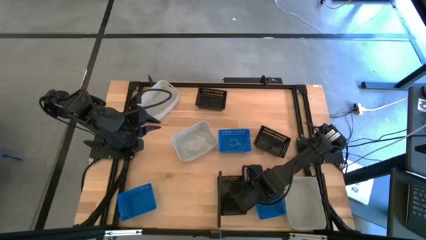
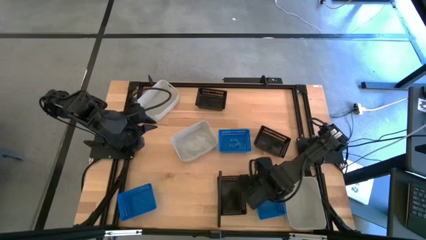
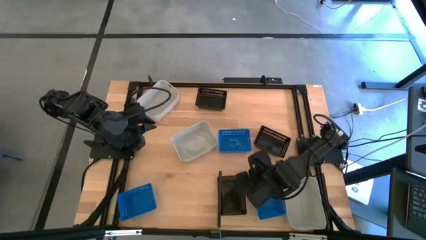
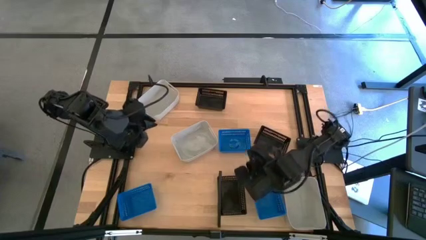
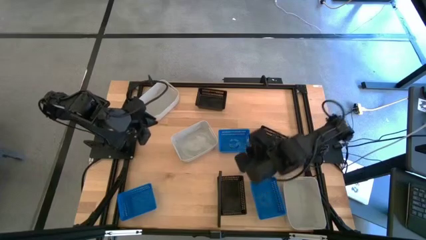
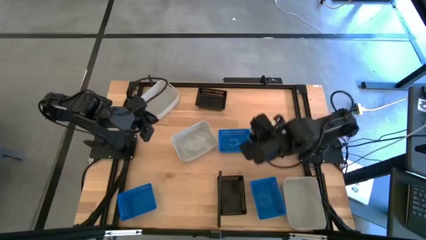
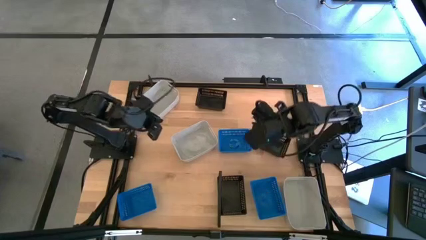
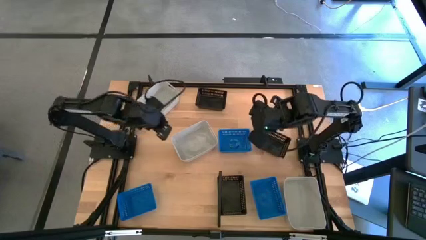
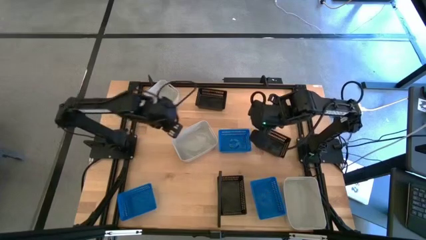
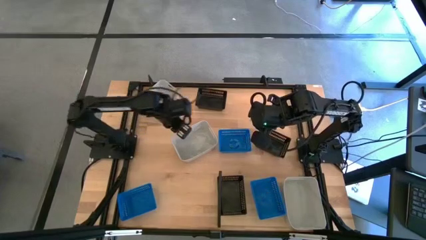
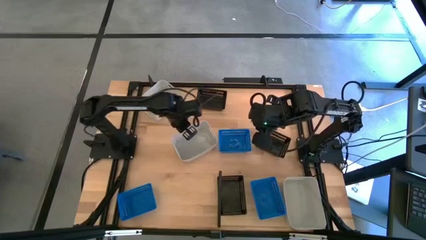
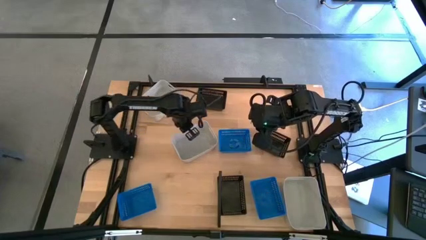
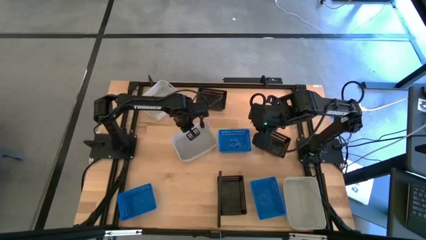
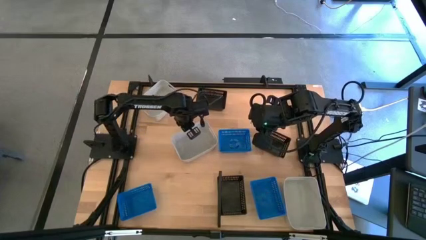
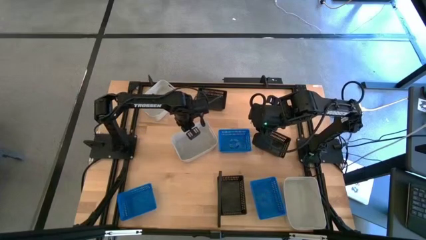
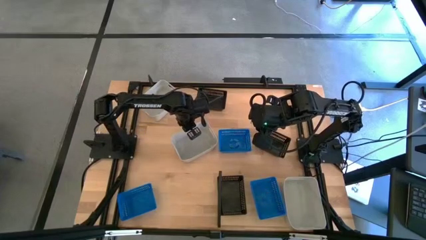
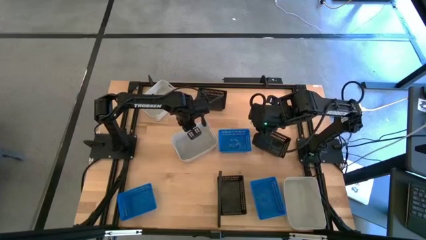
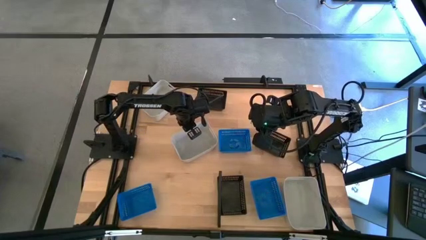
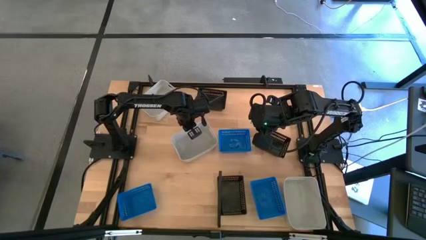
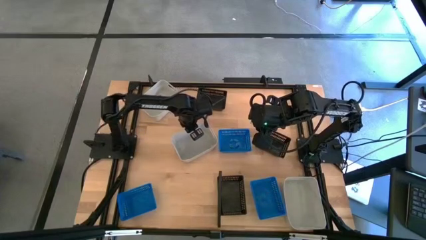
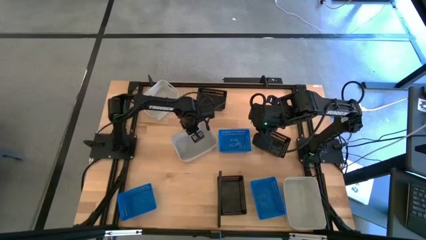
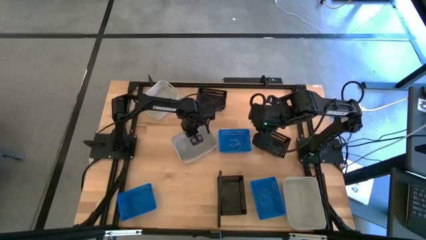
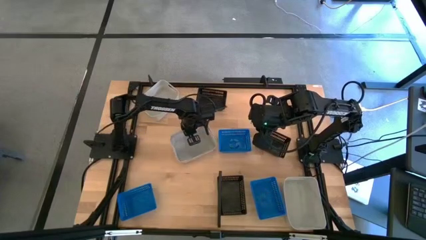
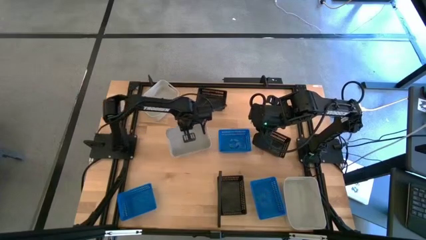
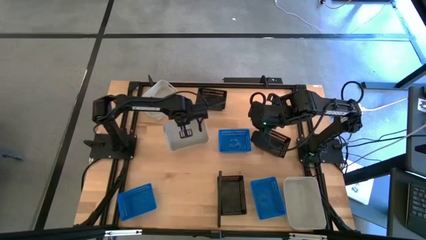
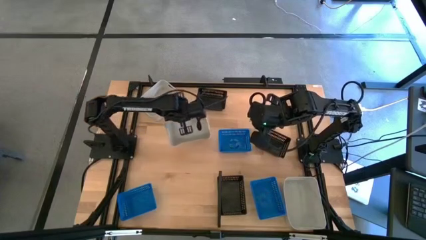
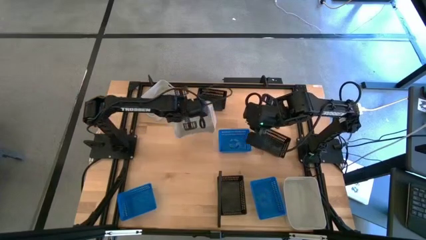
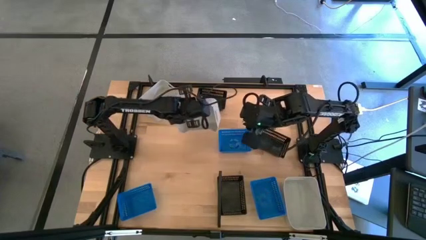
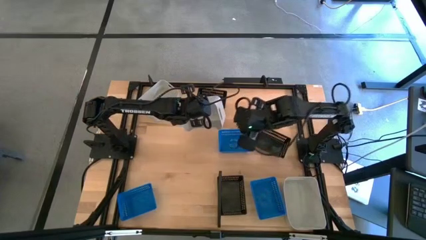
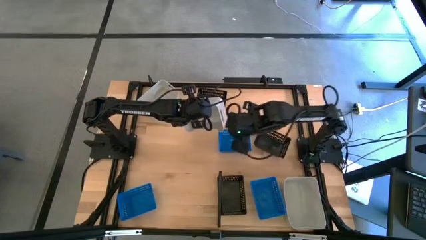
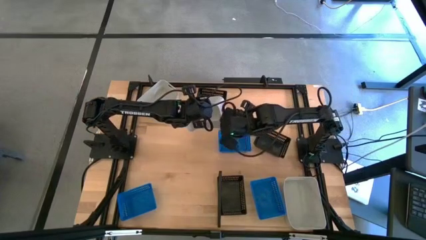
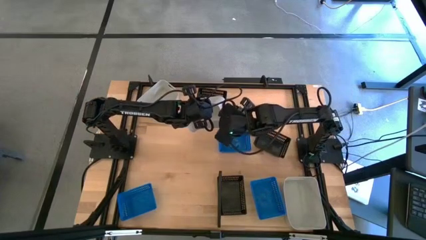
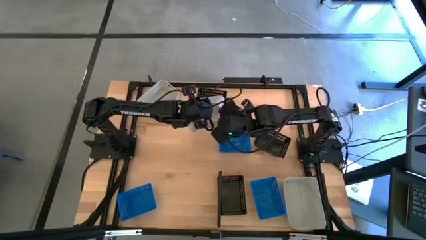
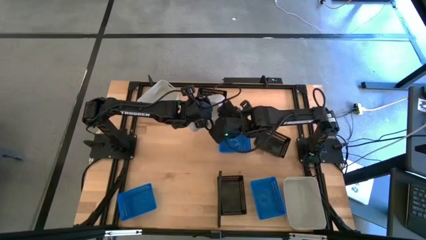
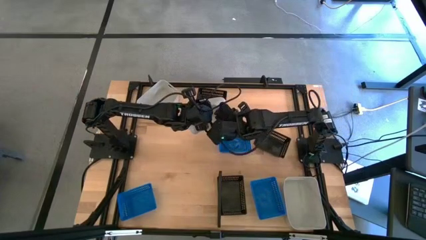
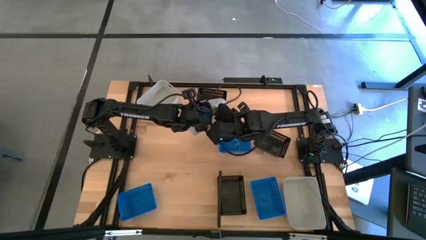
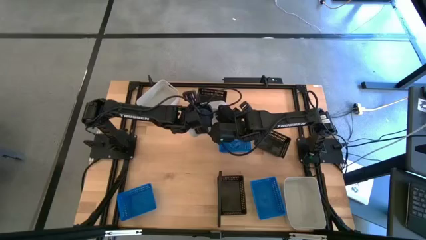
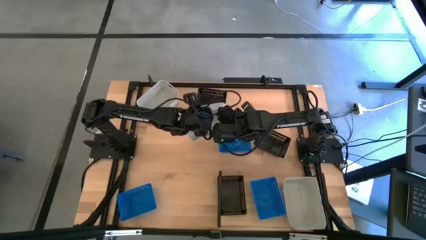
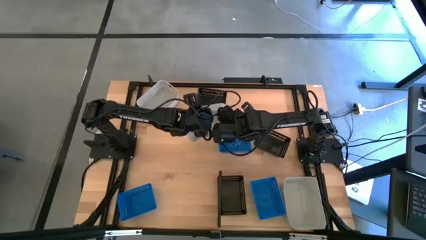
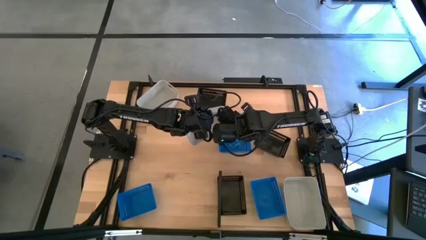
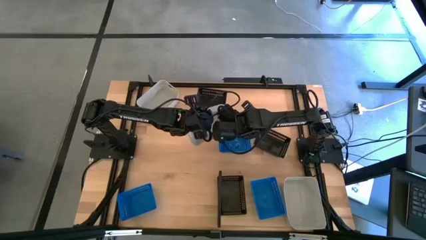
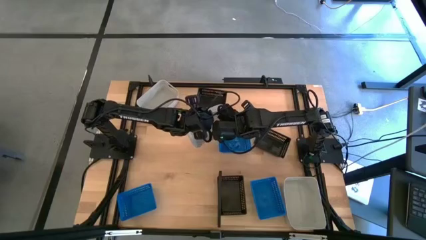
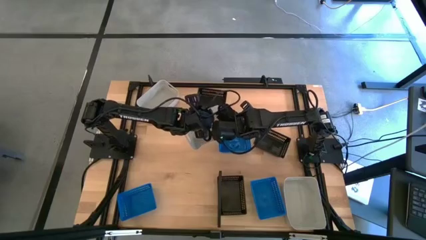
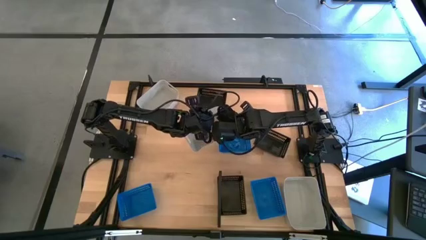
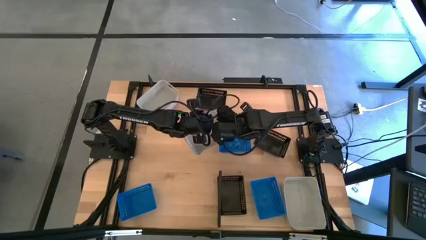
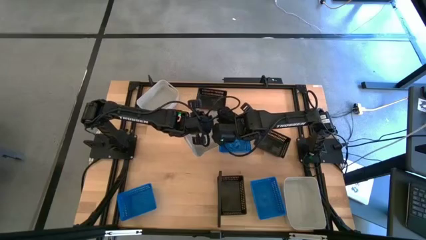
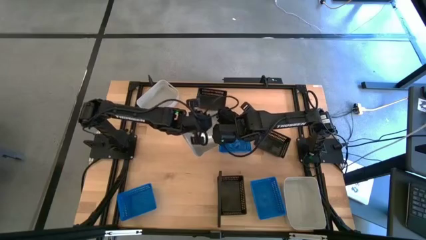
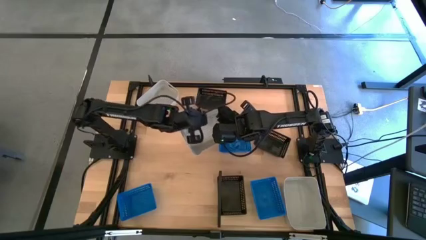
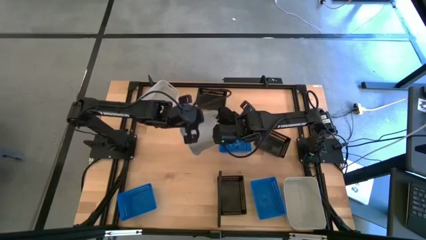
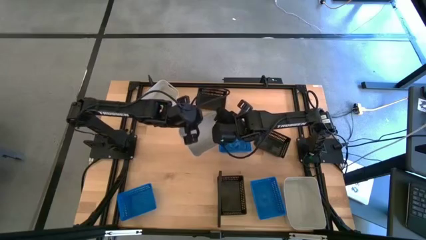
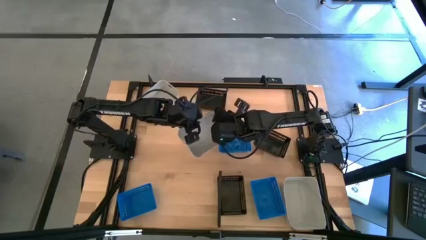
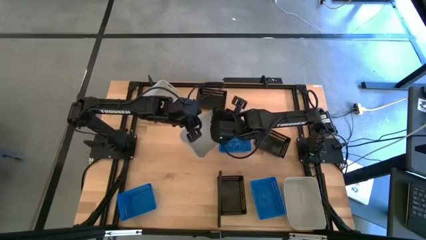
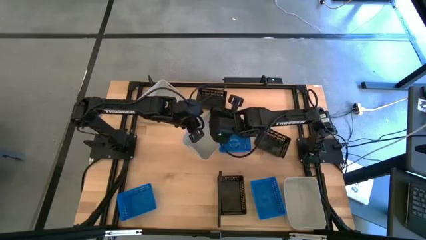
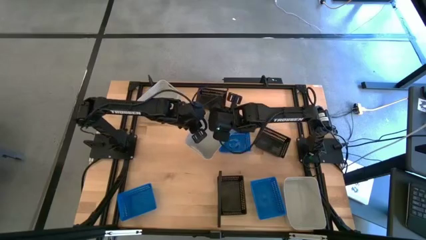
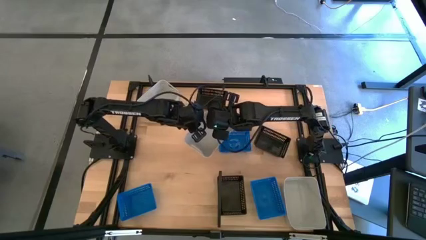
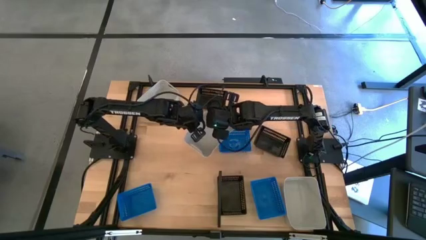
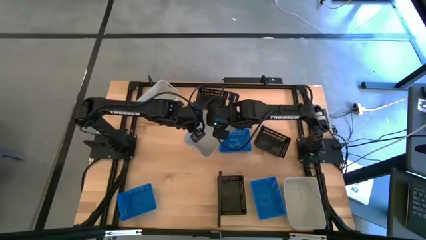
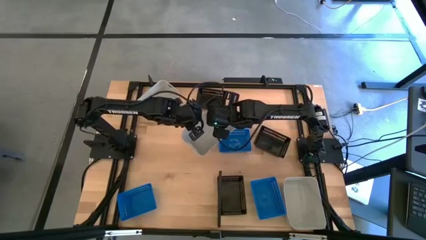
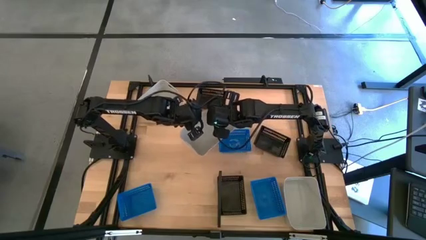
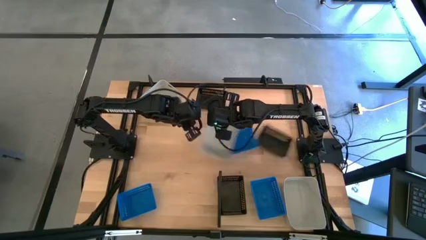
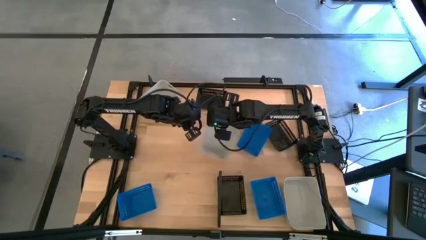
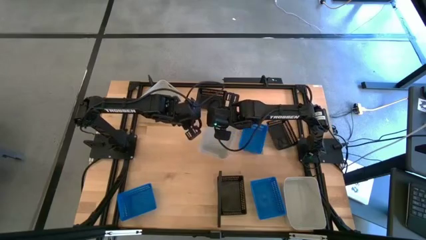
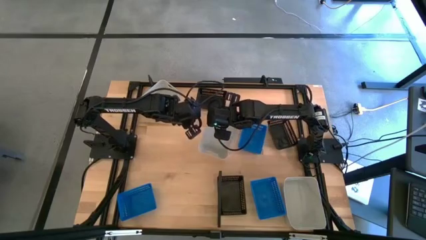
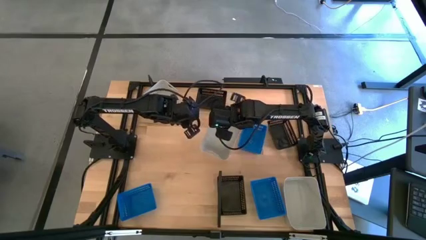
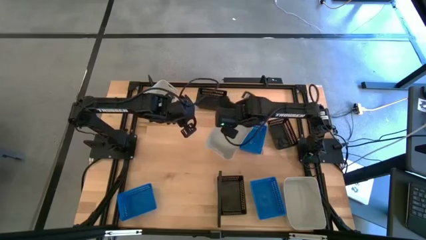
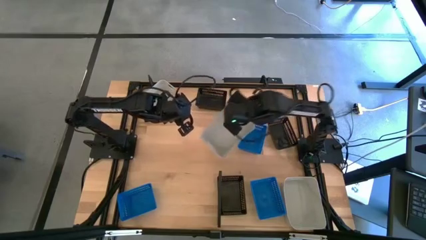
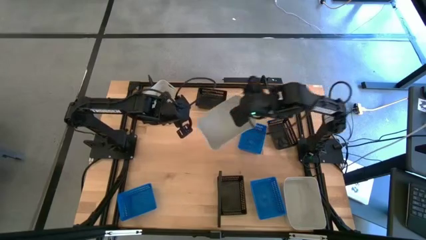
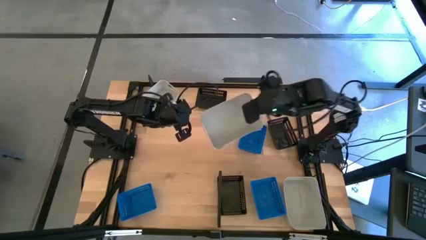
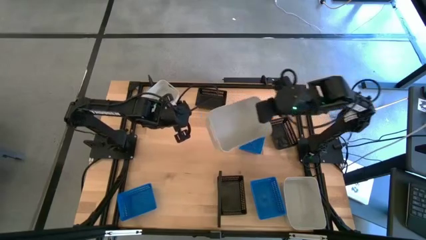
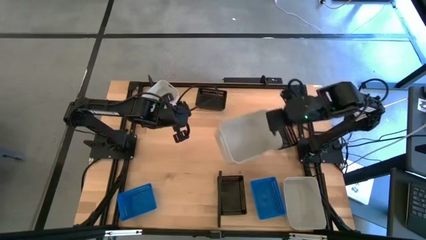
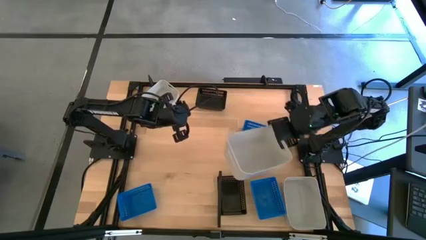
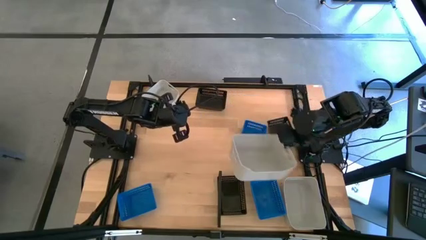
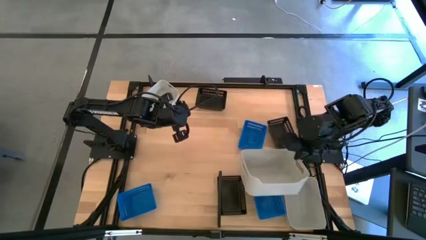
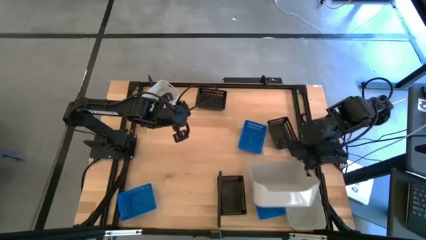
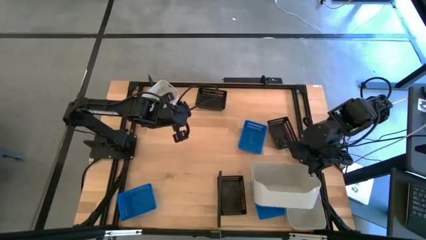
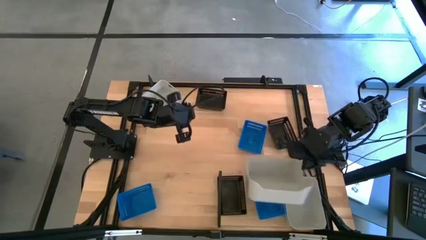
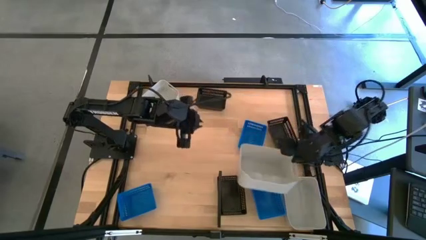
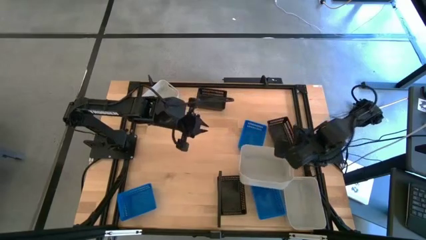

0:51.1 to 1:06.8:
Task: Stack baskets on shelf by color
Stack the bottom gray bin on top of the gray bin on the shelf

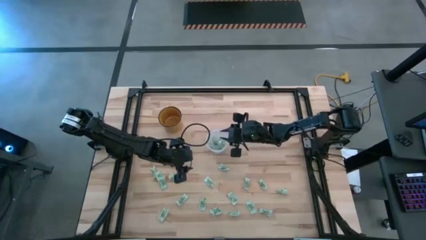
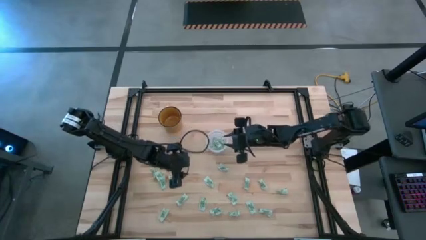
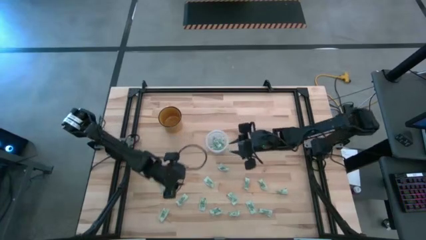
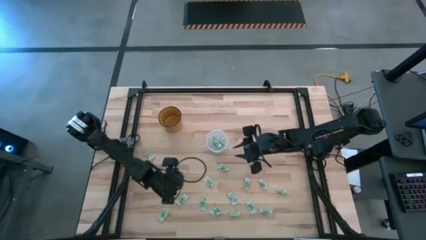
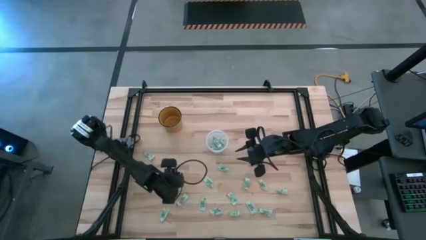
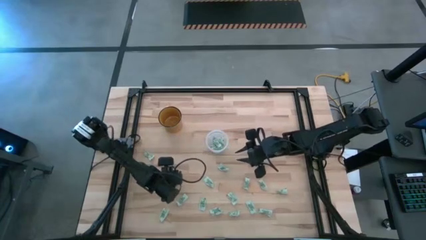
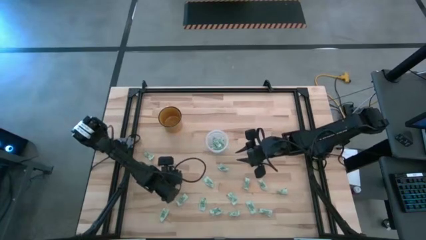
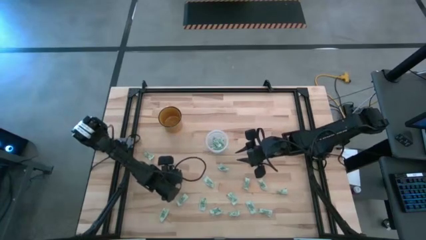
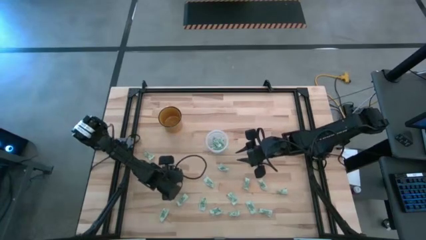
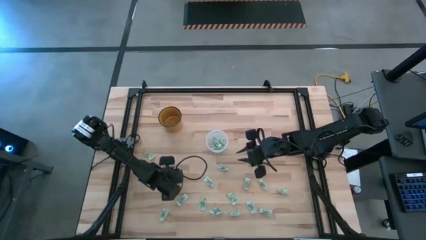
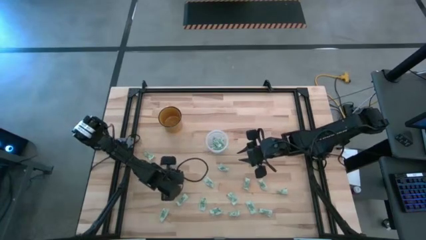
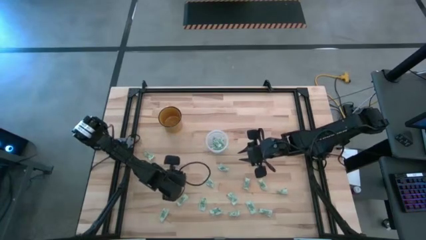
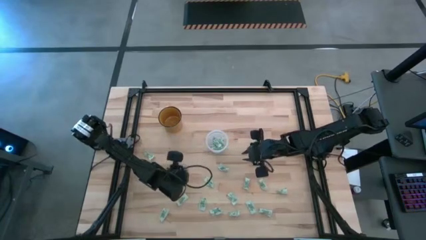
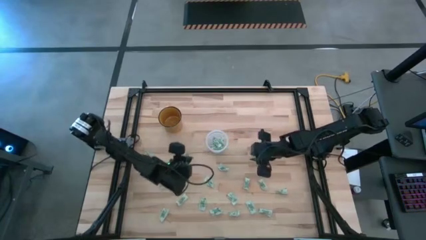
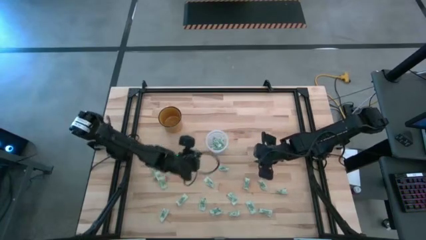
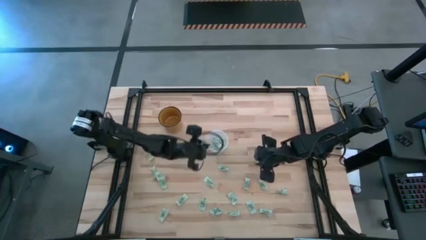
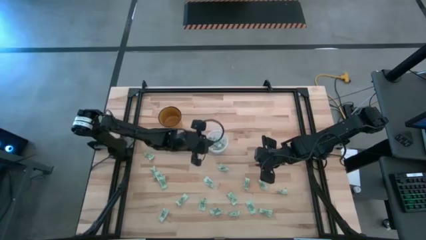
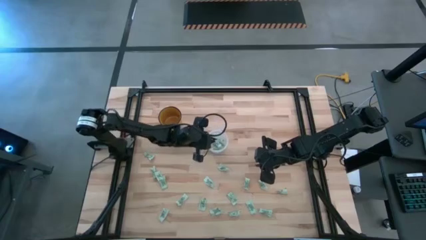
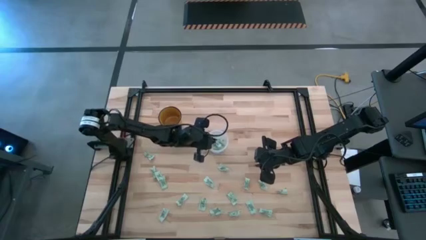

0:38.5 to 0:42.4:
Task: Pick and place Stevia / Truvia into bins
Put the stevia packet into the transparent container
